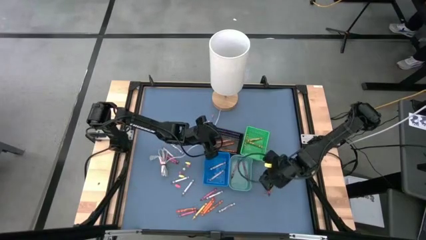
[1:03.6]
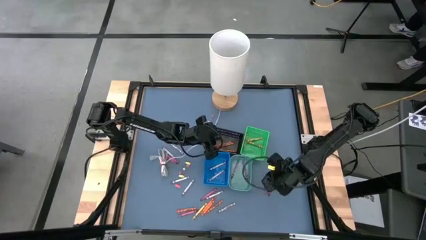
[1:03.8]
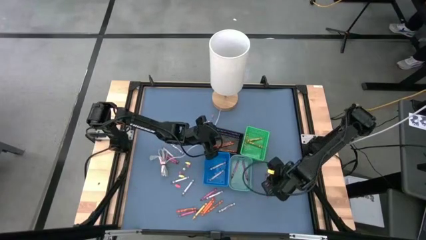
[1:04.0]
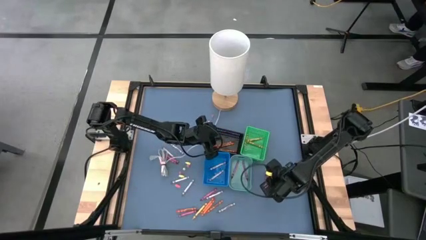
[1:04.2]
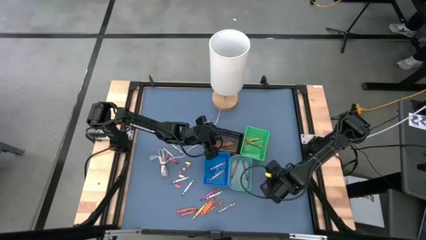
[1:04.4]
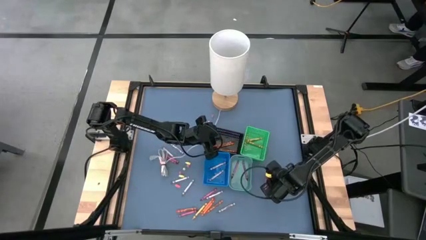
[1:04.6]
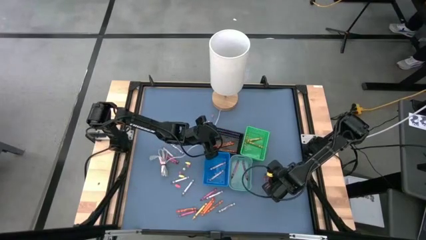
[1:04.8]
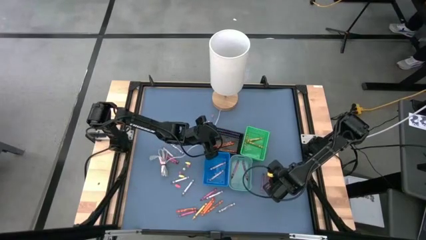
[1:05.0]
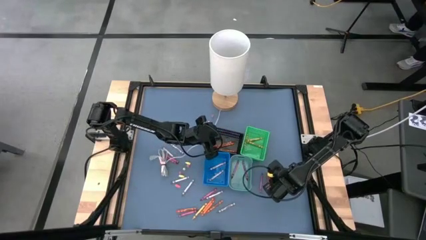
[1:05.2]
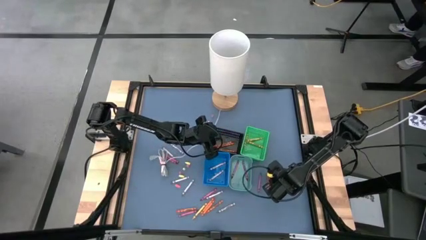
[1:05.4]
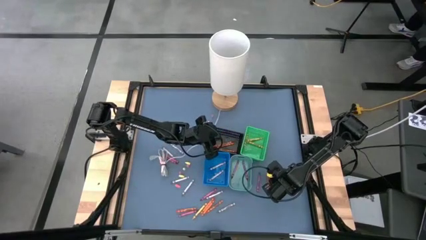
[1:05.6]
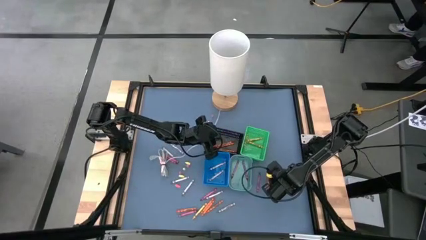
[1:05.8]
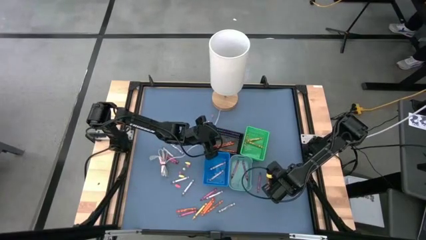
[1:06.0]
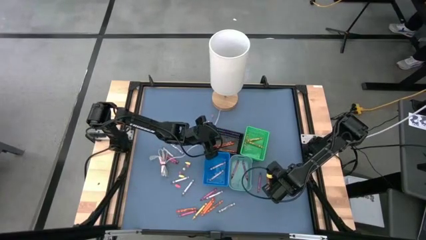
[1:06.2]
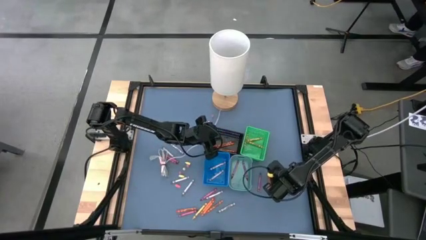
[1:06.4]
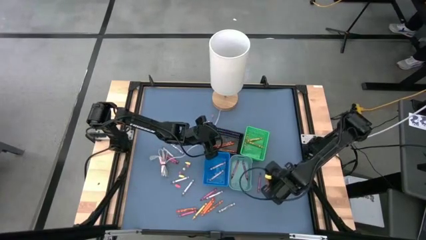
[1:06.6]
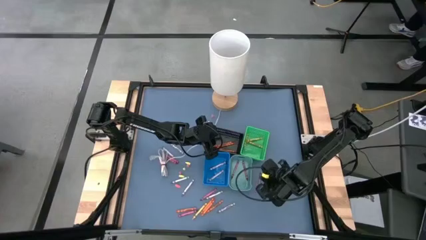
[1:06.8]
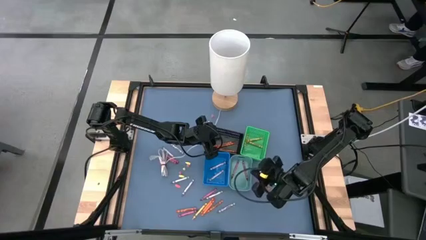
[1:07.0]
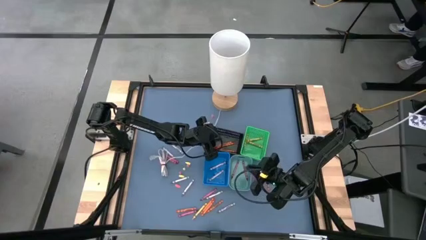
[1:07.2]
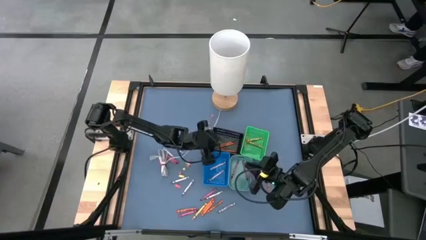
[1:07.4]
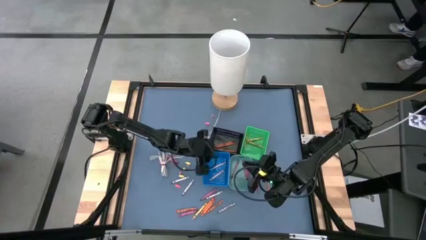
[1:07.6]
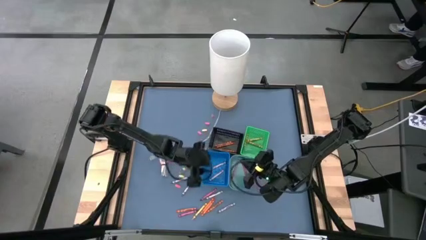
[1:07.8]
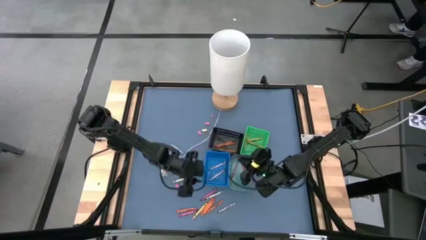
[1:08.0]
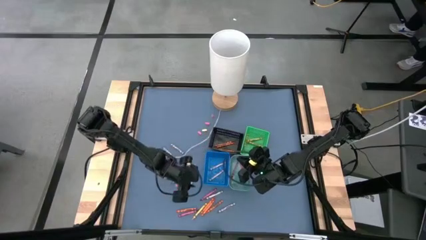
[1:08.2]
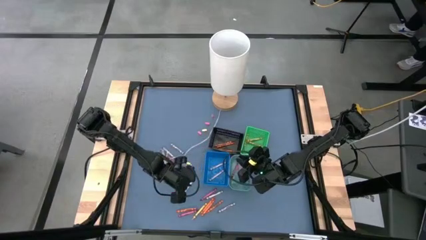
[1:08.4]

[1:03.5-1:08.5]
Task: Sort crayons
Put the red crayon into the light green bin

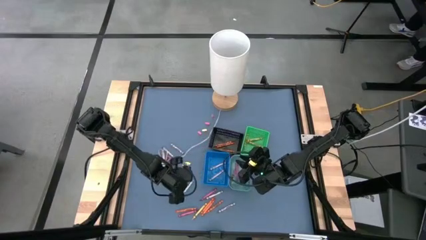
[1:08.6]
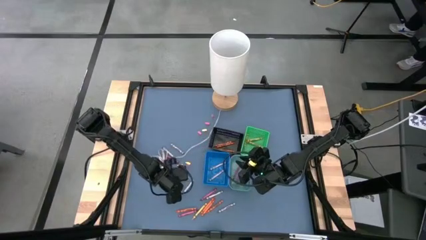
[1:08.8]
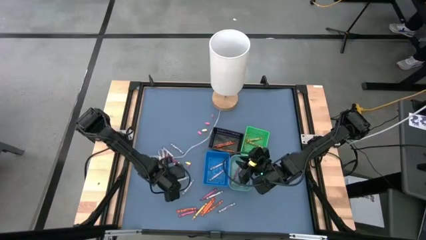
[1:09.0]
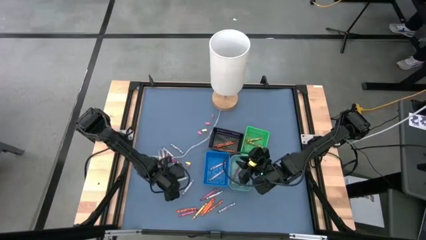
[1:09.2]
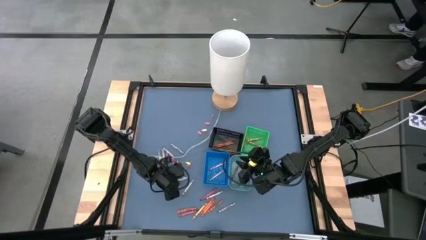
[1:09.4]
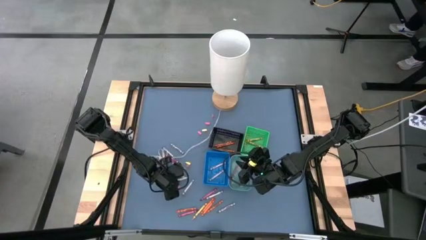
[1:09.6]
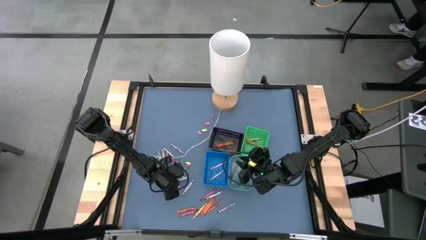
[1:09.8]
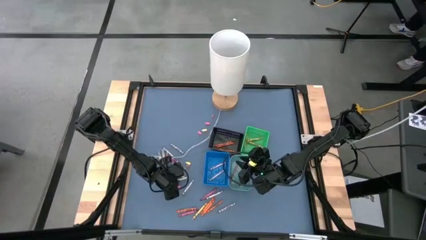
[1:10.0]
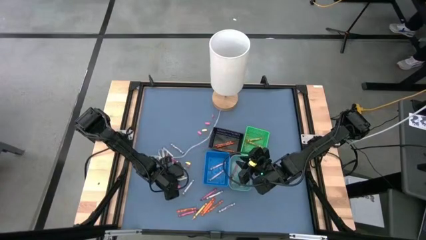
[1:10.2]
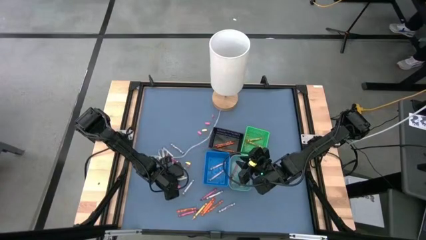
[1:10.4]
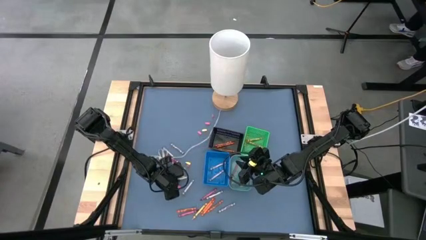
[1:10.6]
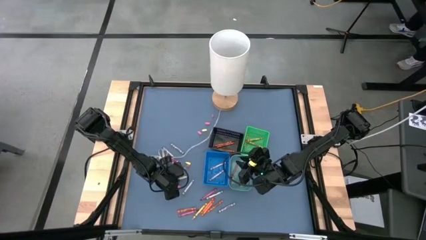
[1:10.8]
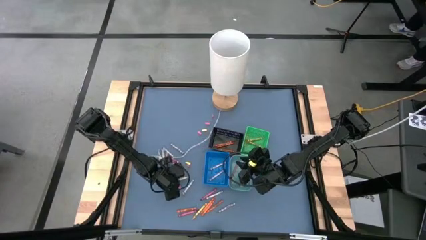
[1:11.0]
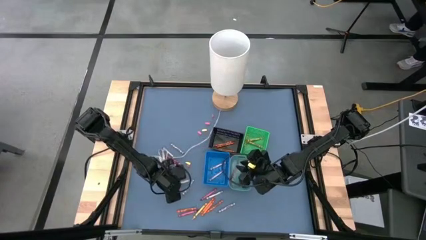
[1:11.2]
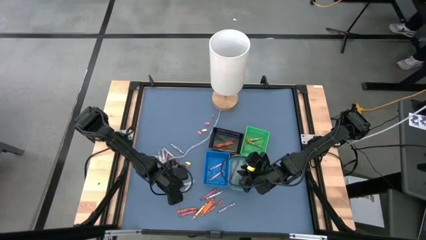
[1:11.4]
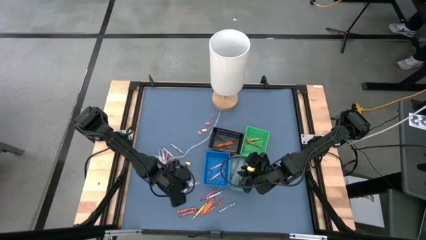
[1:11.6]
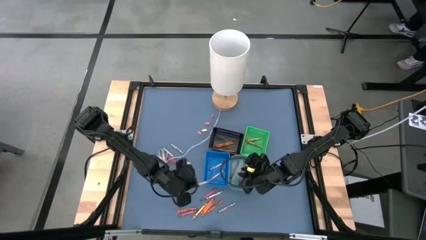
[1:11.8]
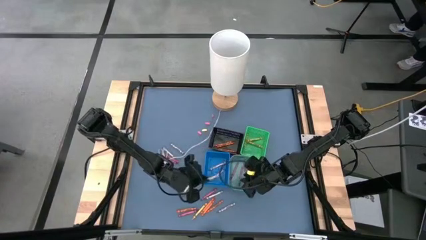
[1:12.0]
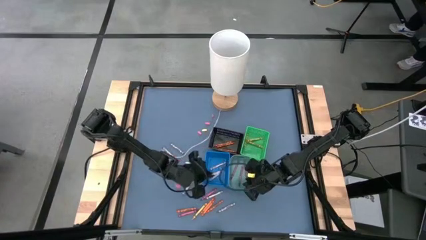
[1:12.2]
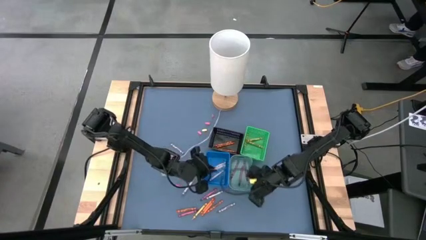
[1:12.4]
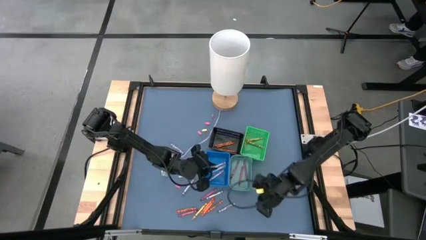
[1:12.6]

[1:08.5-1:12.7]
Put the gray crayon into the blue bin

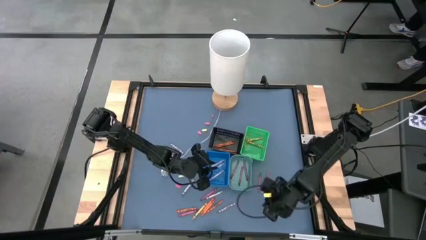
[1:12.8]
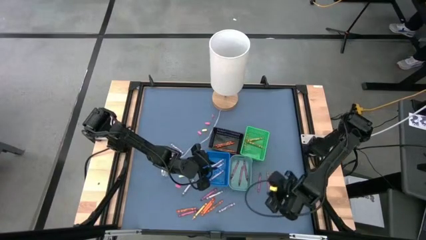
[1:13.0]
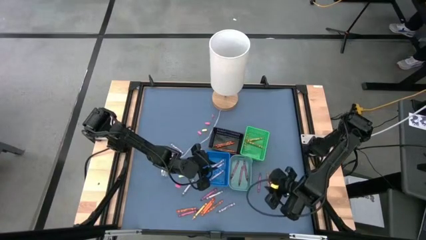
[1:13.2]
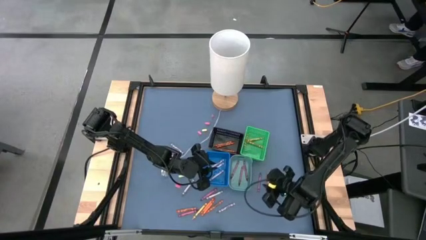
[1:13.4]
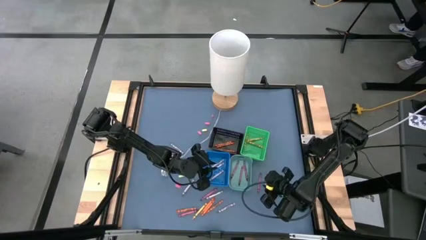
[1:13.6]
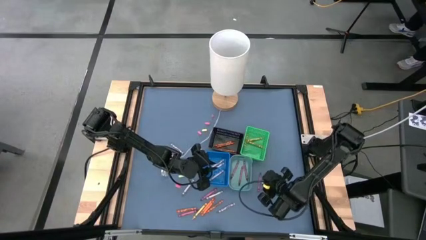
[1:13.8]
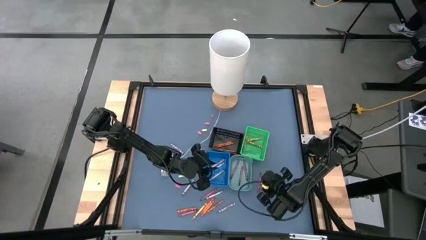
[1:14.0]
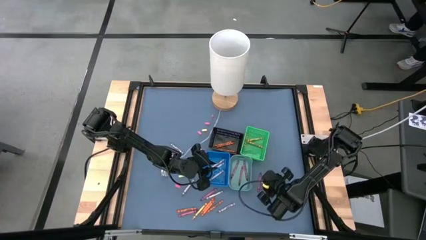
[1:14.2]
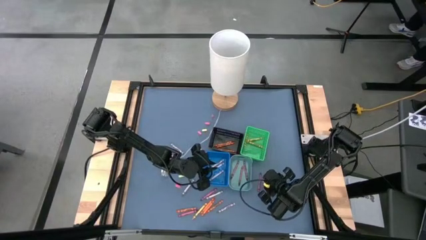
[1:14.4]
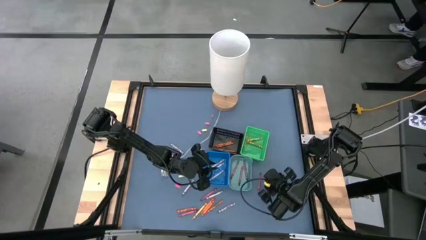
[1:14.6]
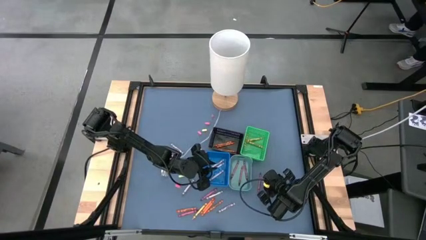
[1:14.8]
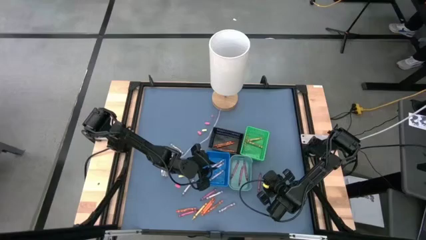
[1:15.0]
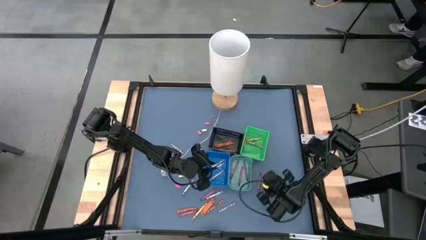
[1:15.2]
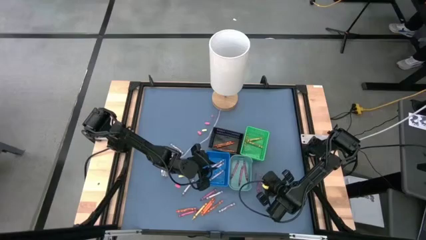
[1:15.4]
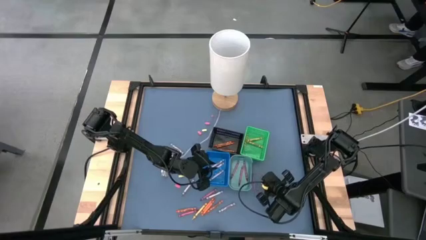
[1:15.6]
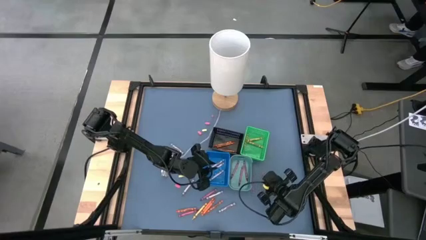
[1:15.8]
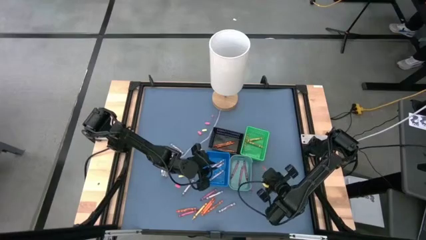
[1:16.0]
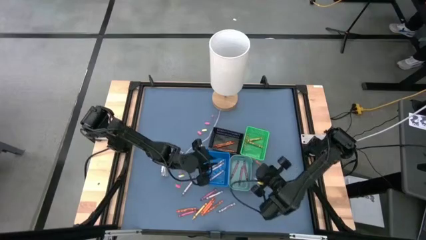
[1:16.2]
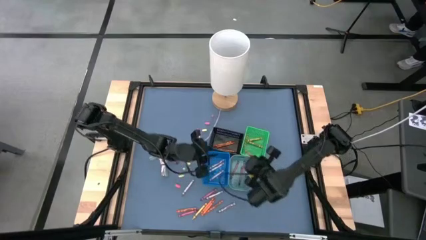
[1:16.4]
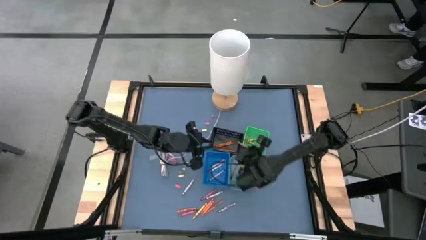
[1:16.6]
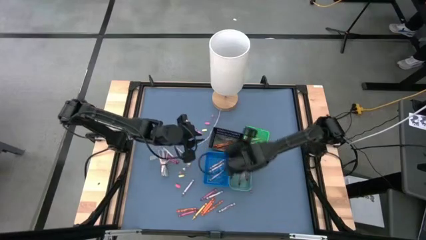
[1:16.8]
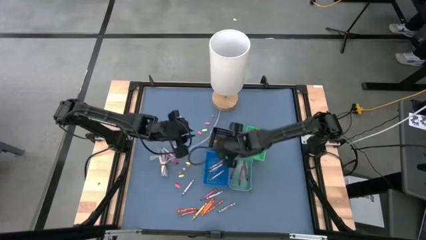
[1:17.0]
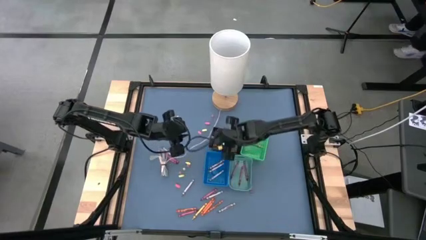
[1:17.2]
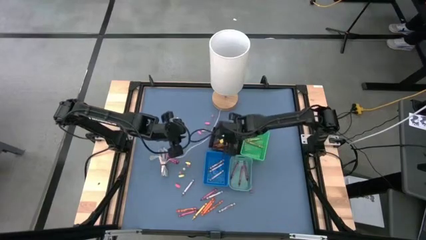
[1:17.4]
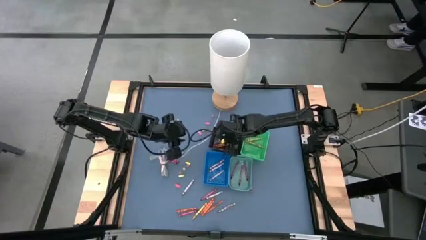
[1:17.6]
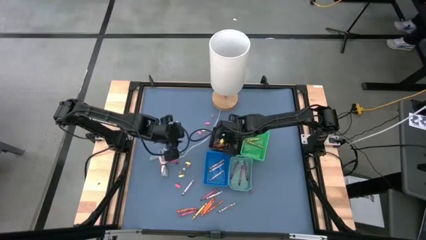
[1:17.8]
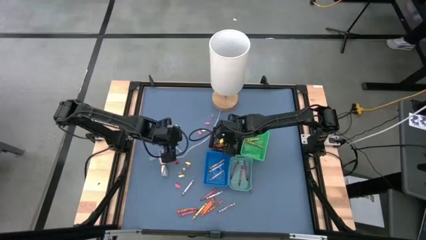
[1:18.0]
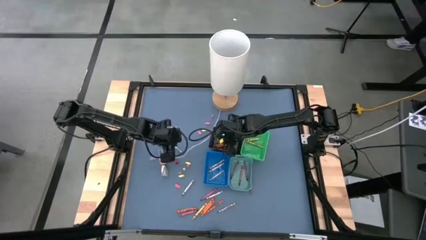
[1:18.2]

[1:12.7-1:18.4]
Put the orange crayon into the black bin

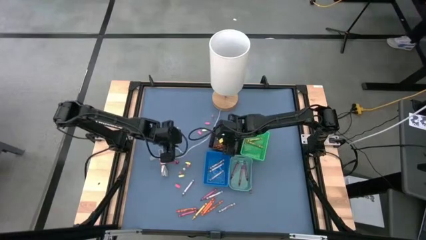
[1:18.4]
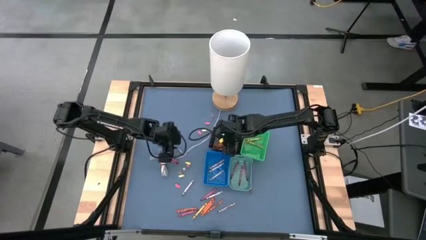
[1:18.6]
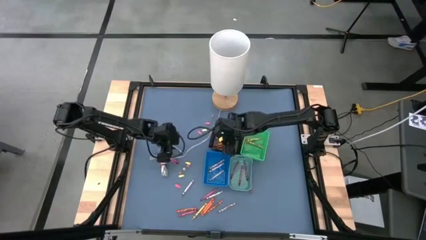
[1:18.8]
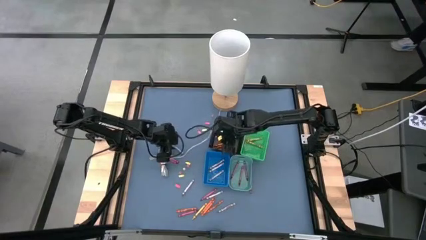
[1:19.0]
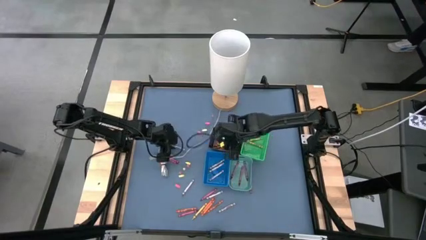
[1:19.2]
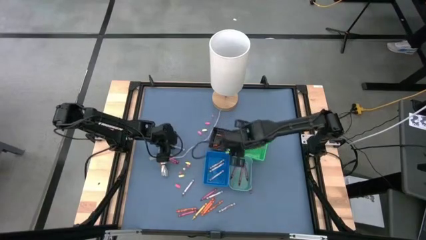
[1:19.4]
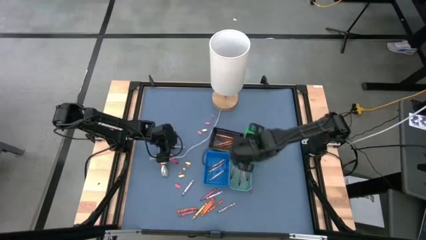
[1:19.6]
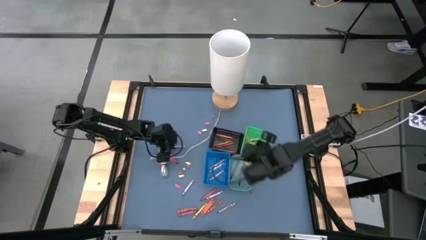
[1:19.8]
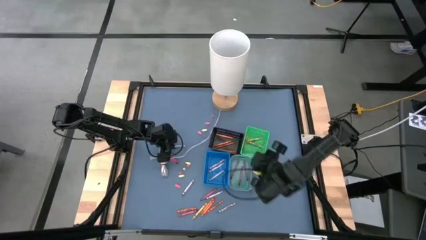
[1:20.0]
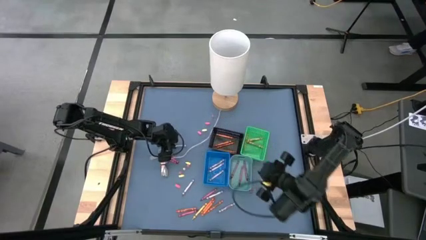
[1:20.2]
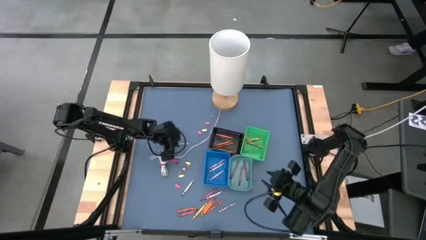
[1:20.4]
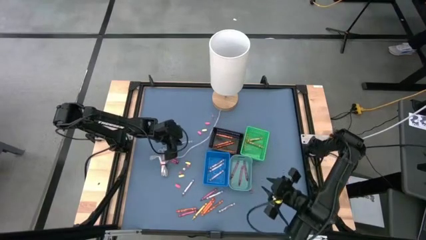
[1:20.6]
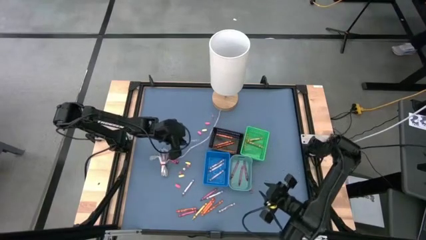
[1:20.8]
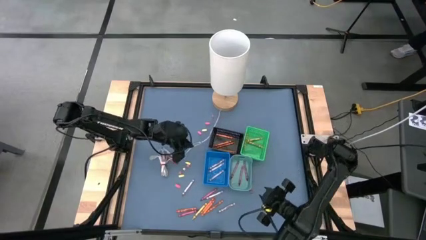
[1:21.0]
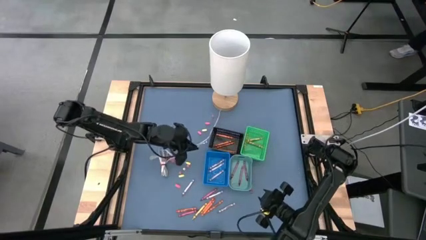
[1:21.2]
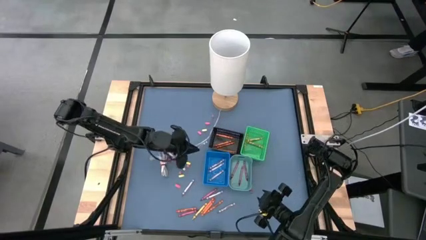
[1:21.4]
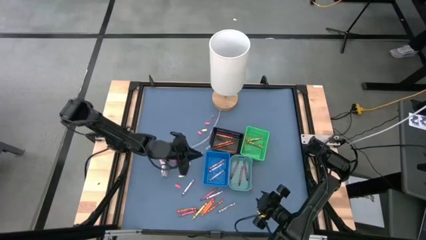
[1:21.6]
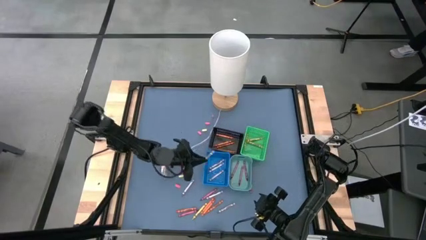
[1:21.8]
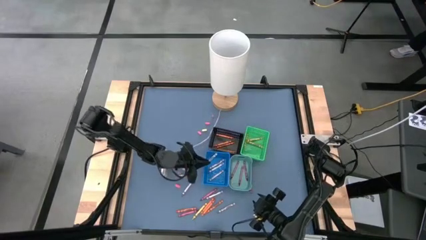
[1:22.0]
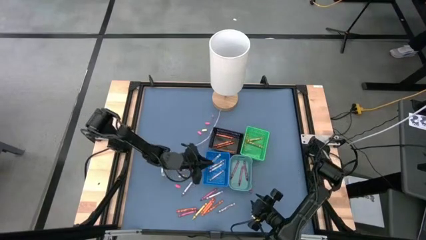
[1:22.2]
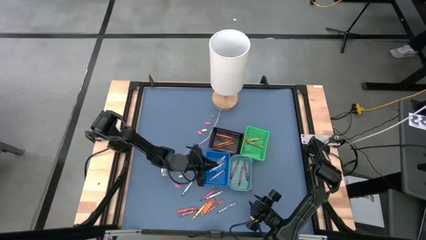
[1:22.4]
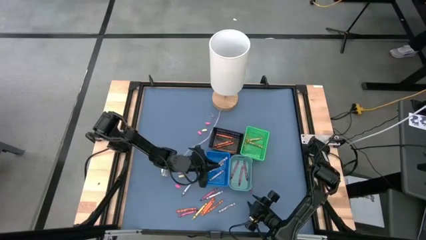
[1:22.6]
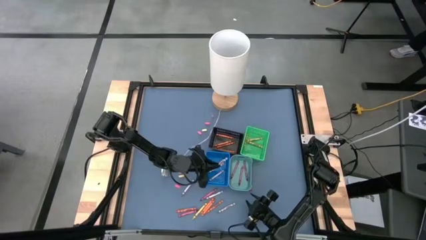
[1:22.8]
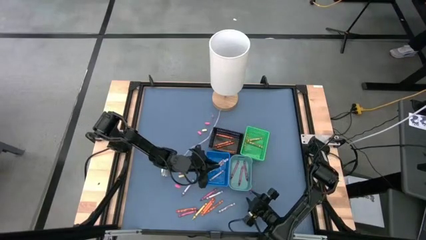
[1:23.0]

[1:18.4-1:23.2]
Put the gray crayon into the blue bin
